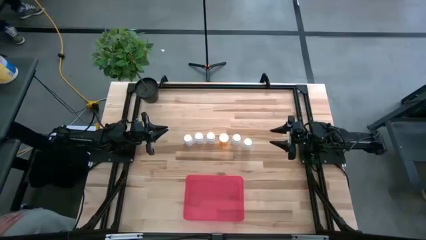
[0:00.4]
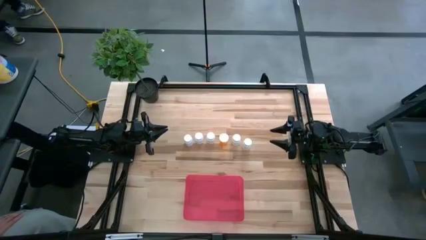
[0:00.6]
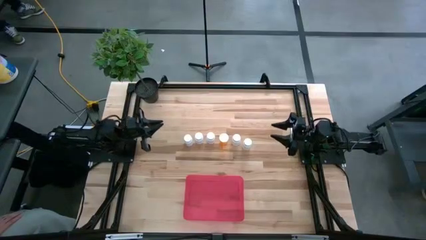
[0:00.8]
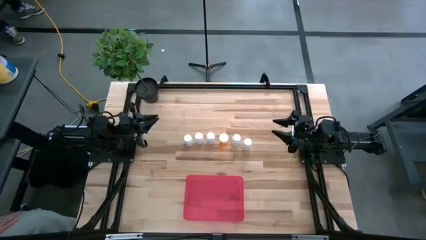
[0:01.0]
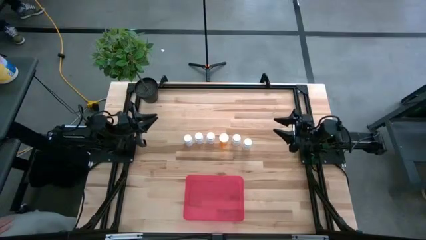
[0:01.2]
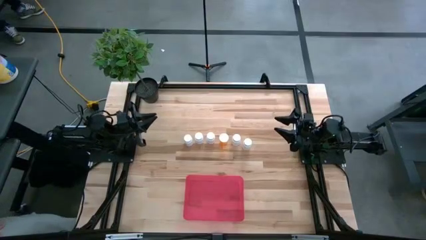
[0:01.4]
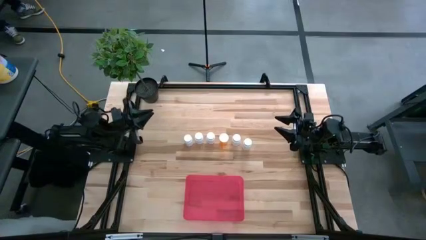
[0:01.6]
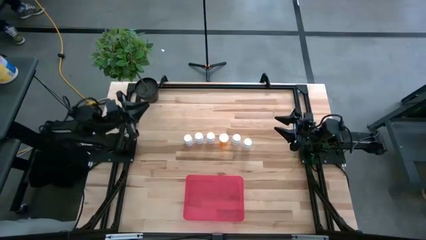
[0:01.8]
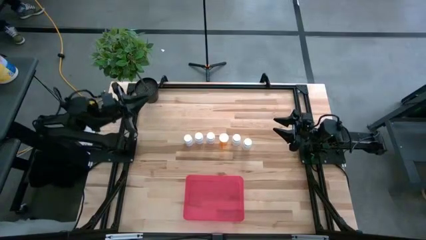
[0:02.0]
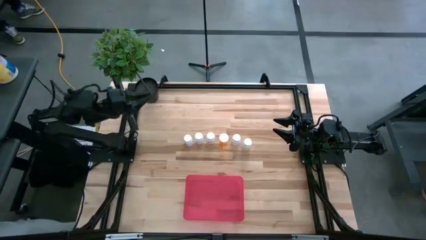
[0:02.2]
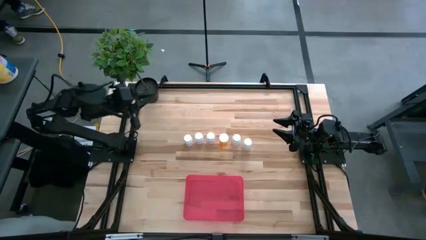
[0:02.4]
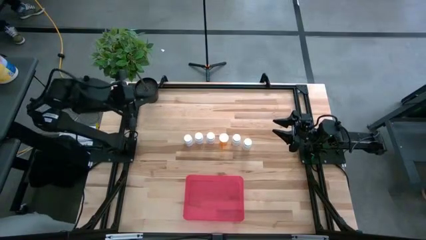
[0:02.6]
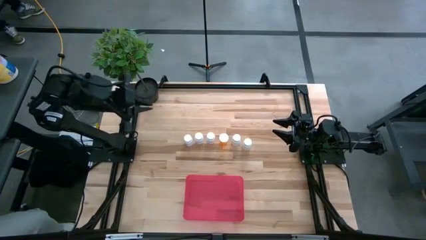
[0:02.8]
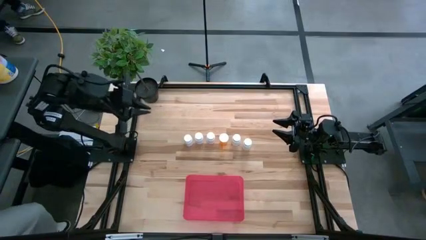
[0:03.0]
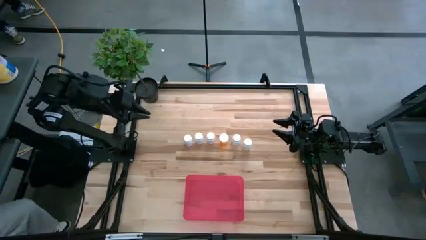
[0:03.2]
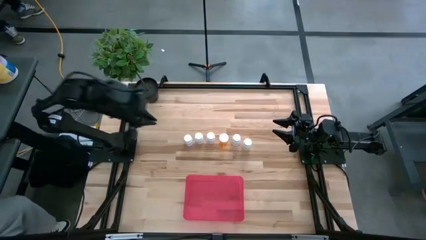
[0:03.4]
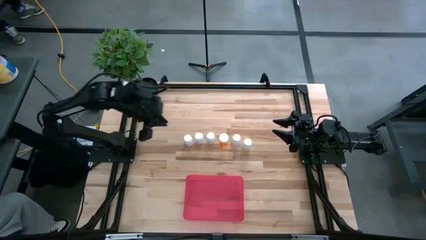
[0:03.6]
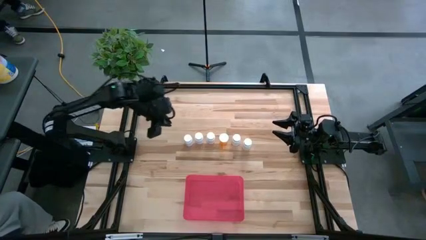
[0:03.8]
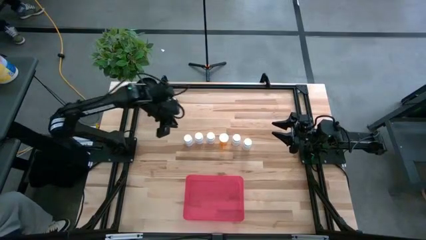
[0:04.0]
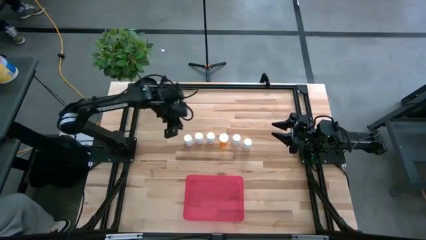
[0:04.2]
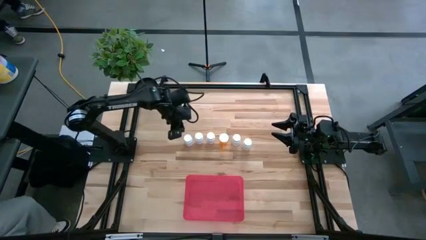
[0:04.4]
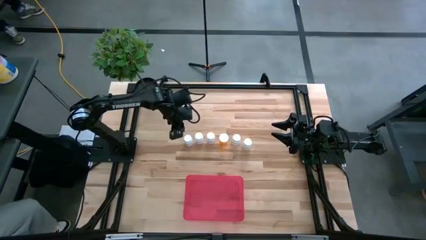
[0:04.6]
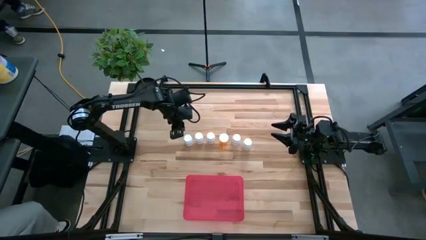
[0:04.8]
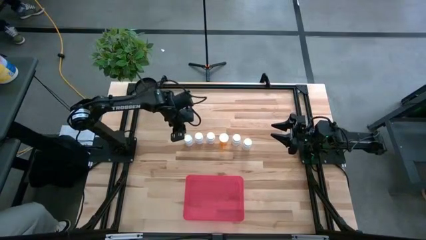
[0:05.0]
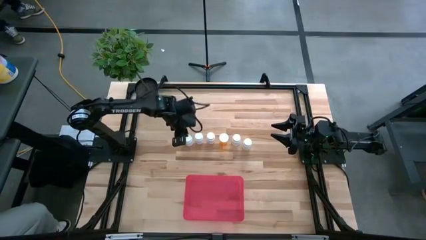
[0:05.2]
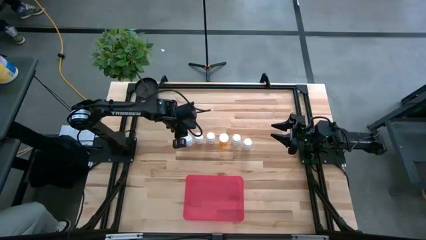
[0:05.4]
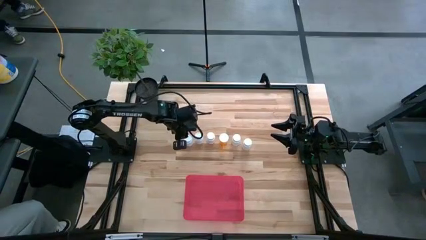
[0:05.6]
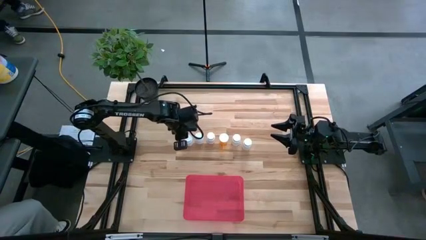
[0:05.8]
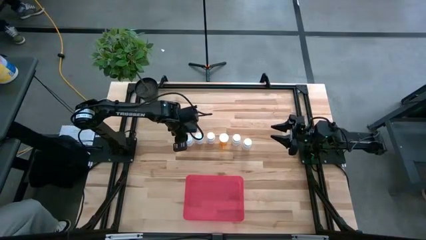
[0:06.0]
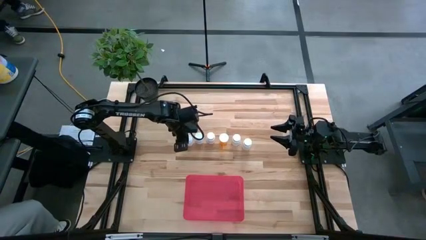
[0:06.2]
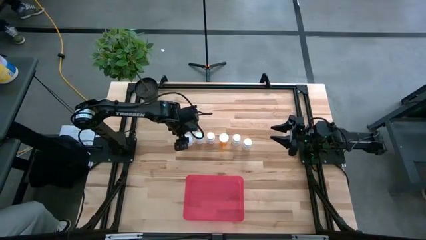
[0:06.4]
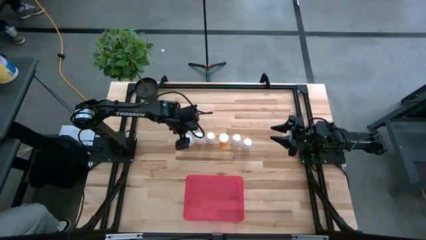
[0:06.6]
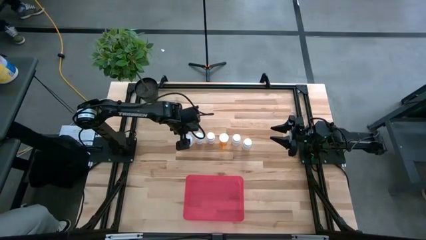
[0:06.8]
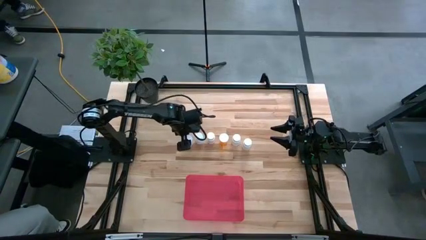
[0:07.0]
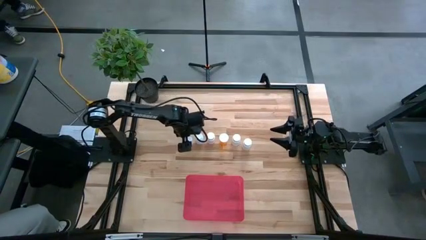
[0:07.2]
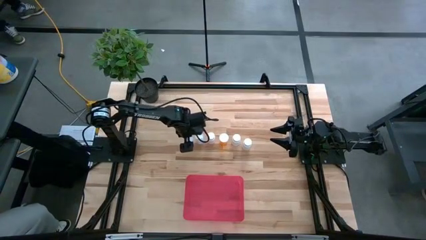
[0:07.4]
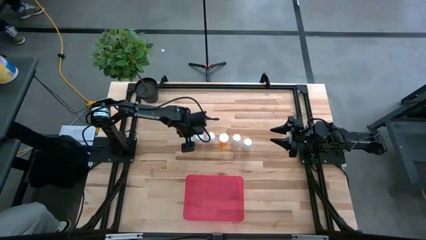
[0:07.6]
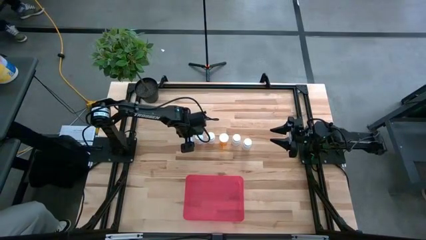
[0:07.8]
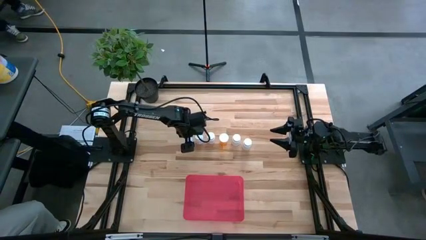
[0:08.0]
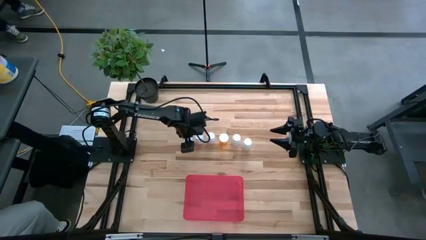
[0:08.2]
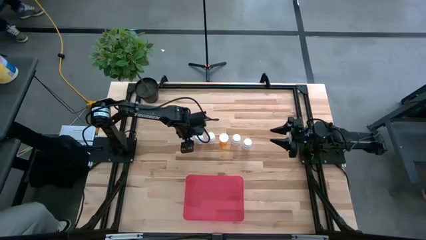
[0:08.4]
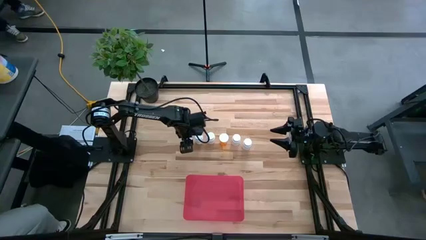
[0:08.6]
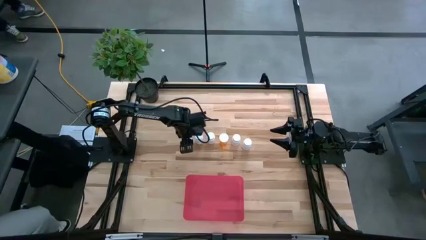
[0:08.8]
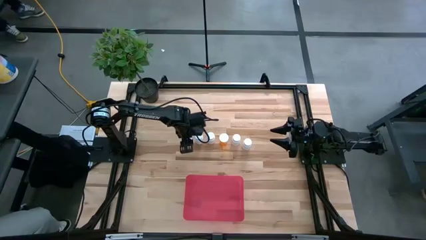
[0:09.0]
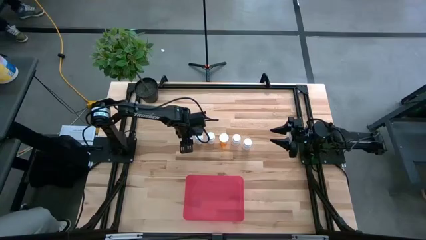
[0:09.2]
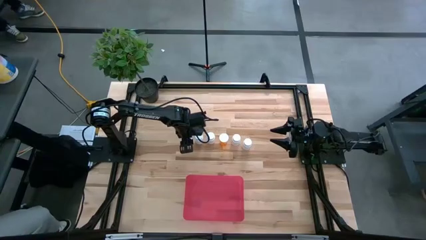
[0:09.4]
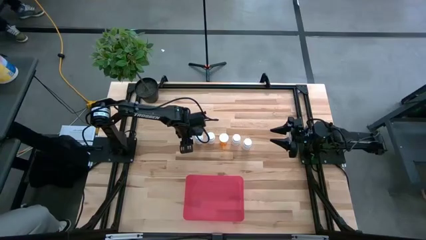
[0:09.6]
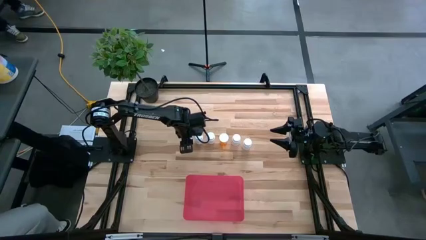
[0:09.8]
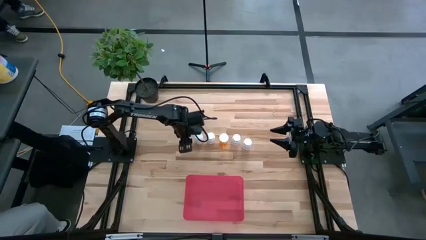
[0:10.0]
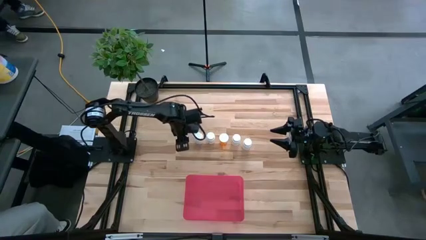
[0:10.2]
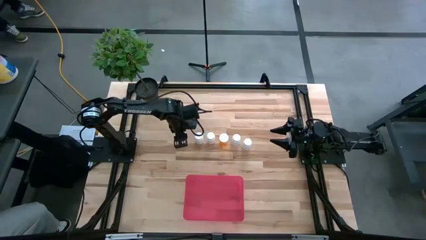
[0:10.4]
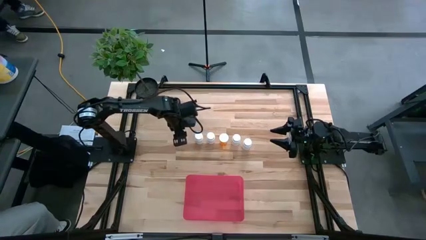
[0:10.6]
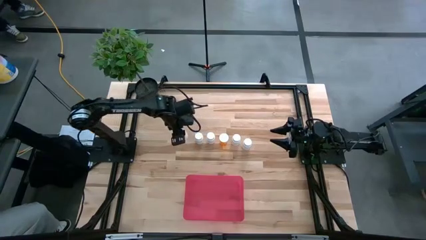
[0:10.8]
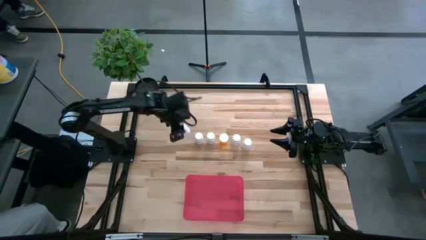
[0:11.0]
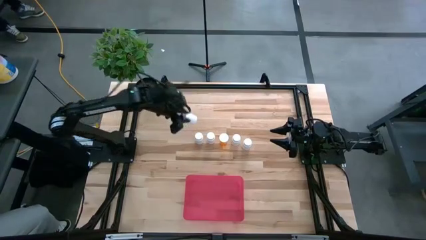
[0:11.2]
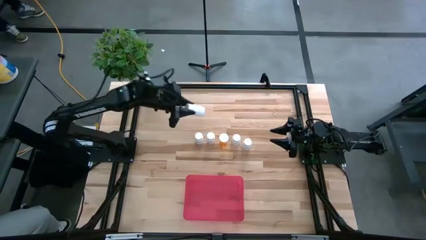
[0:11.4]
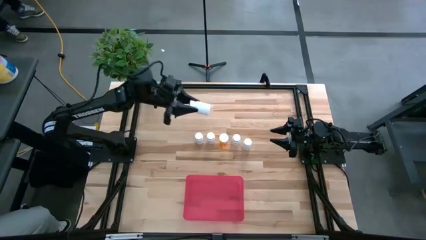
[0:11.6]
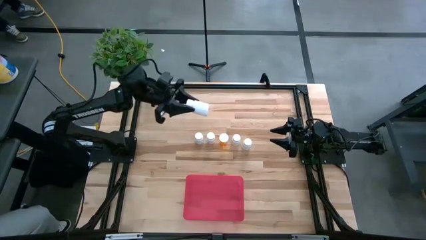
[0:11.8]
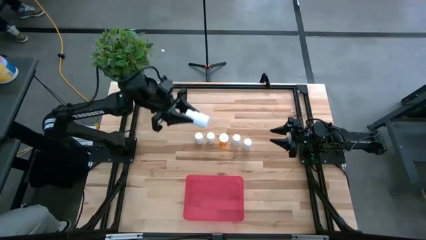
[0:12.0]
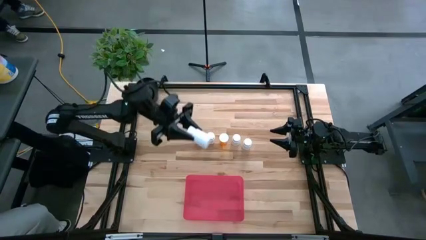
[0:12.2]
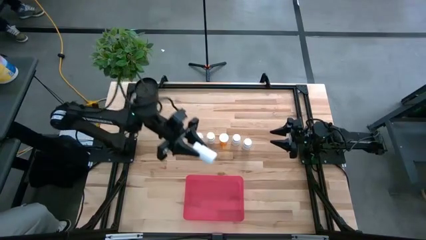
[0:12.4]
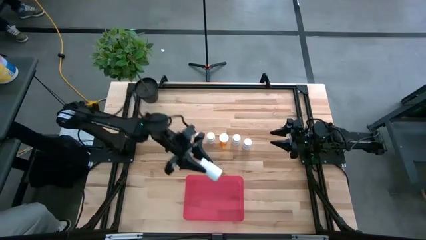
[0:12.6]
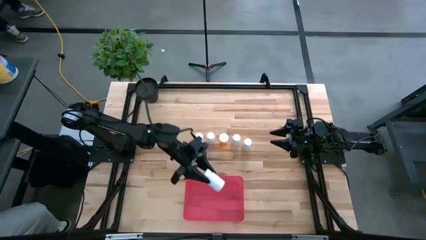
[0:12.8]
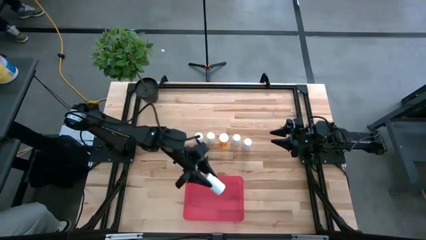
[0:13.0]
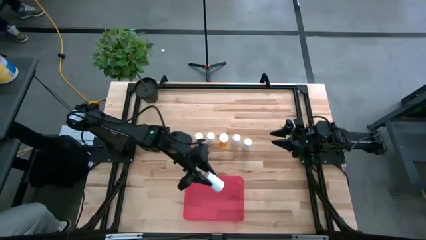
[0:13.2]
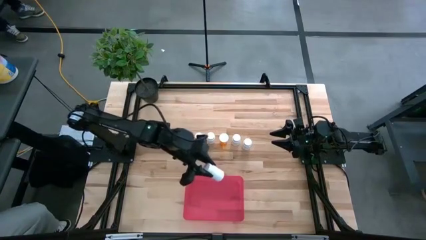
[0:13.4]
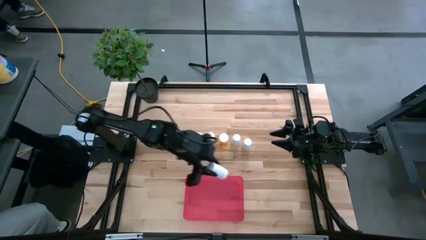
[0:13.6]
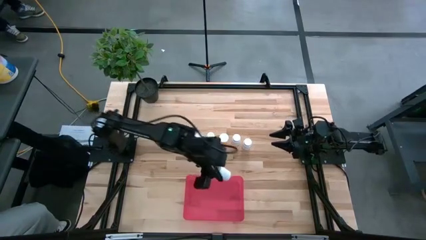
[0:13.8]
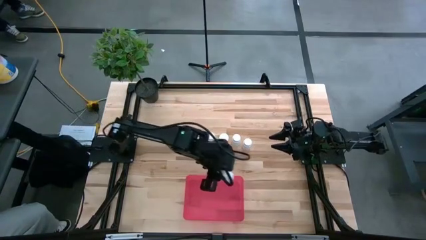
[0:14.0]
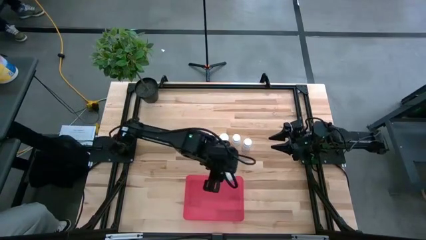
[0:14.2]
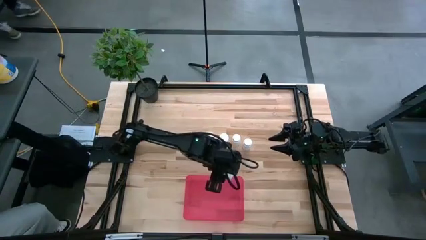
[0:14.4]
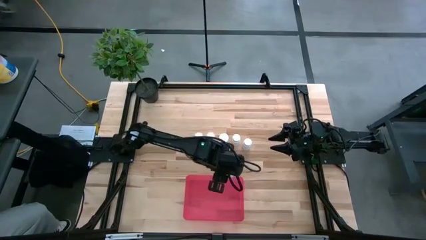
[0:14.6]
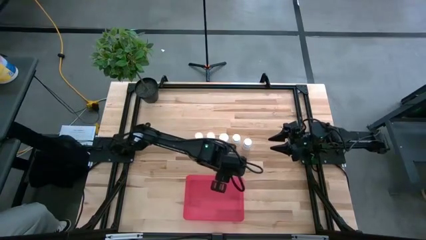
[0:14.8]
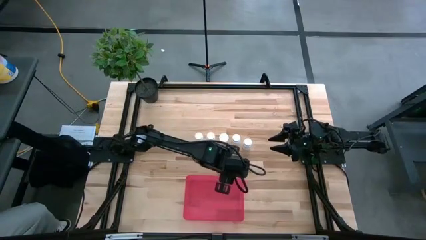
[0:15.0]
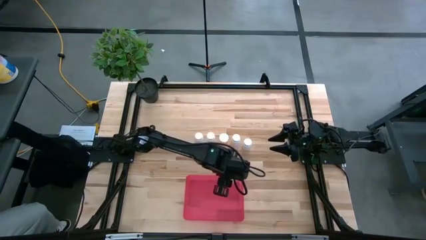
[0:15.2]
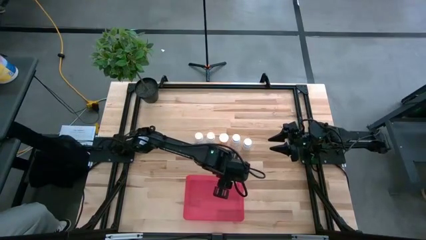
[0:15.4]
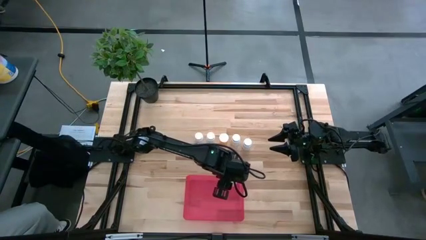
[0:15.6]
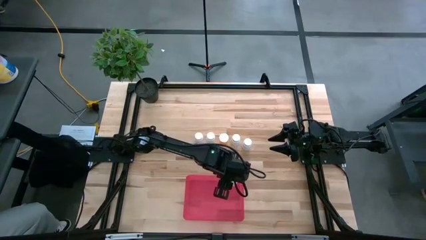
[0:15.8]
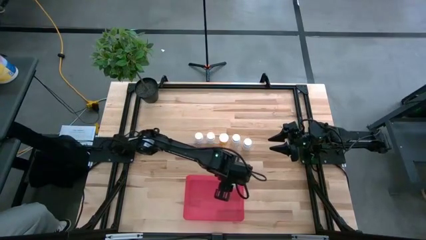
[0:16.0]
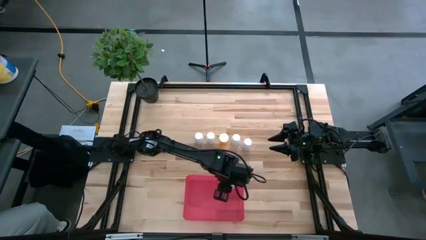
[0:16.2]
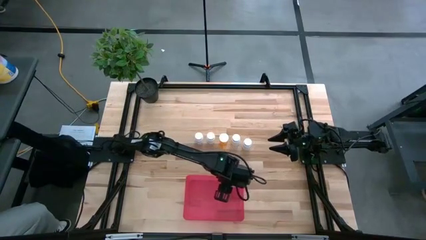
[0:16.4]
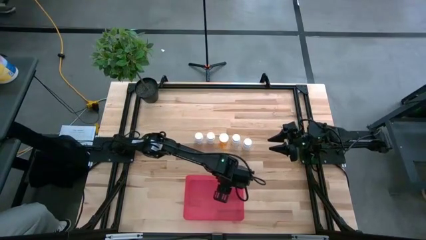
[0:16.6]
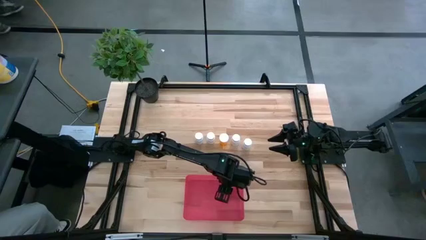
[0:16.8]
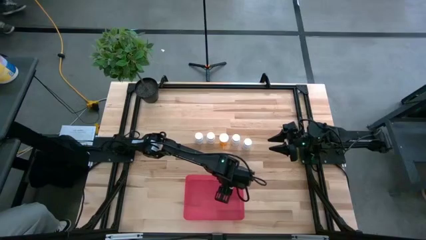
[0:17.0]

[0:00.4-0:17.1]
Task: Pick and place pill bottles into a basket
Put the white pill bottle into the red bin
